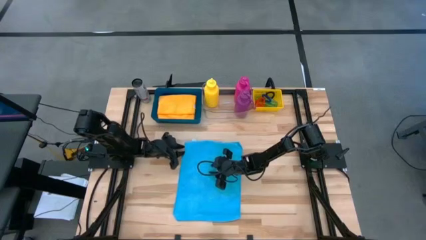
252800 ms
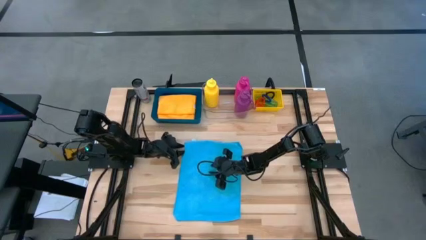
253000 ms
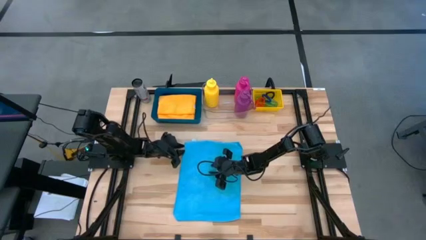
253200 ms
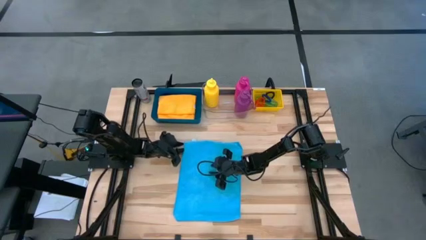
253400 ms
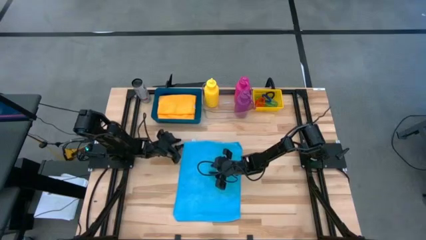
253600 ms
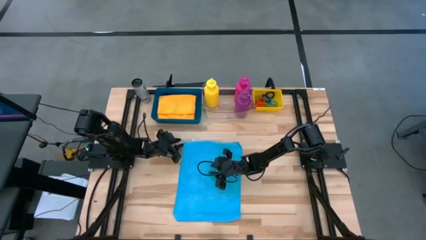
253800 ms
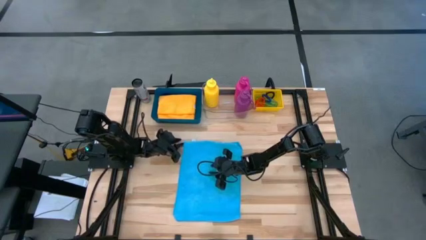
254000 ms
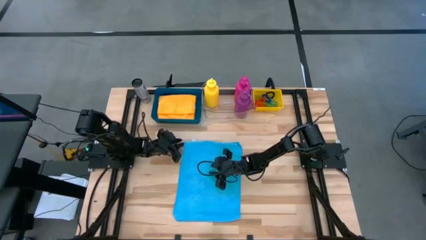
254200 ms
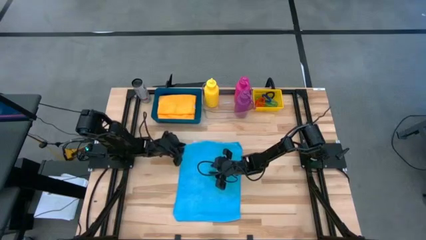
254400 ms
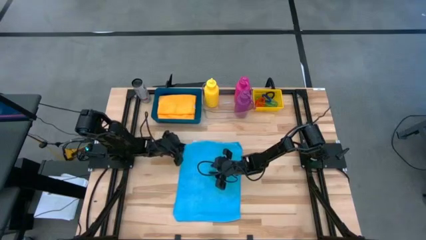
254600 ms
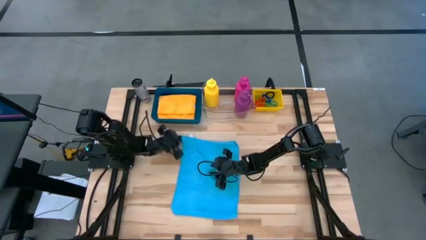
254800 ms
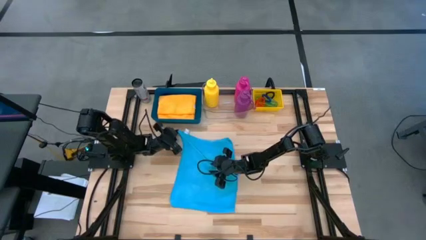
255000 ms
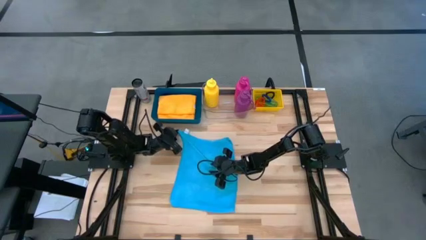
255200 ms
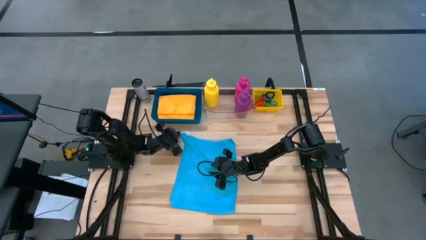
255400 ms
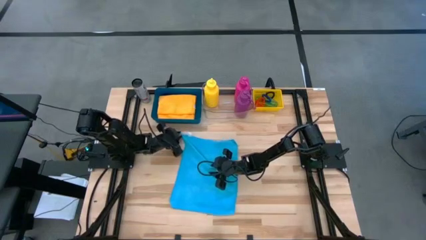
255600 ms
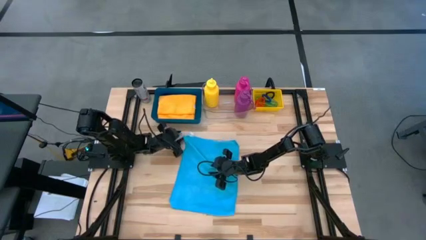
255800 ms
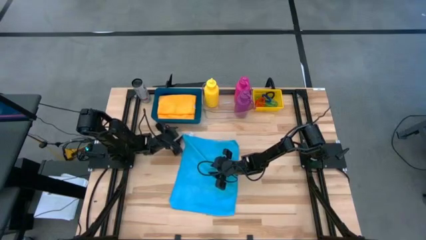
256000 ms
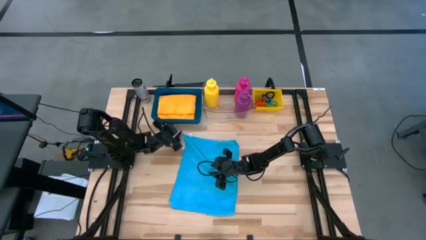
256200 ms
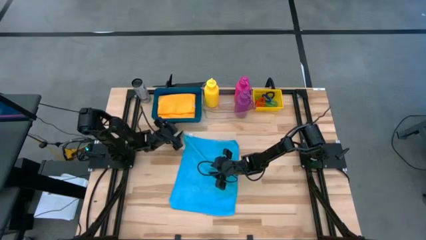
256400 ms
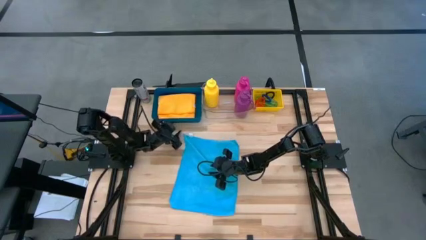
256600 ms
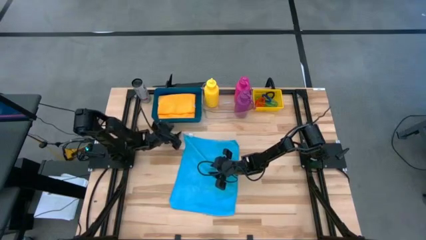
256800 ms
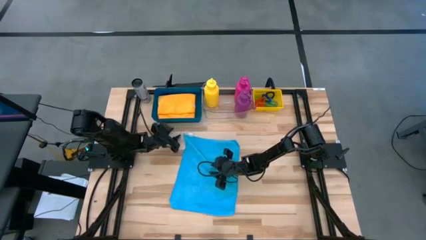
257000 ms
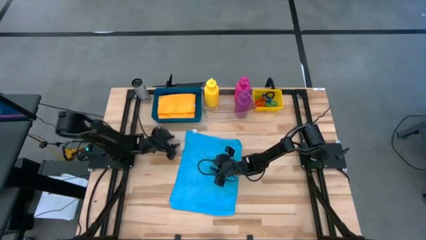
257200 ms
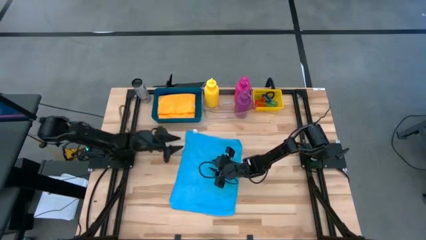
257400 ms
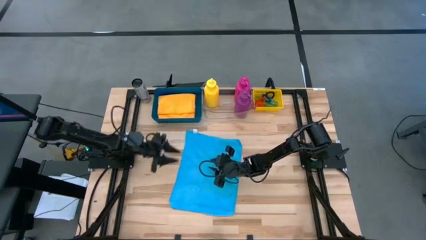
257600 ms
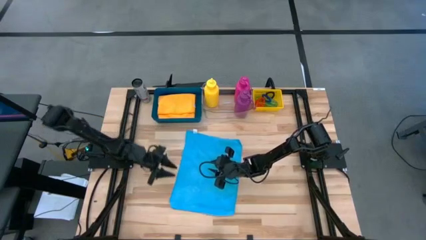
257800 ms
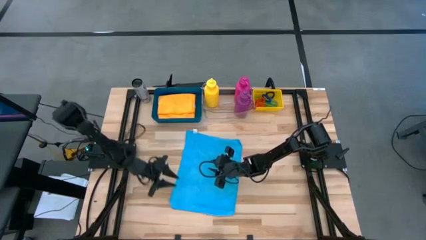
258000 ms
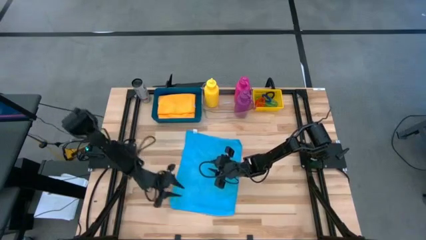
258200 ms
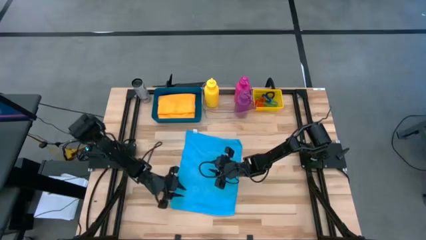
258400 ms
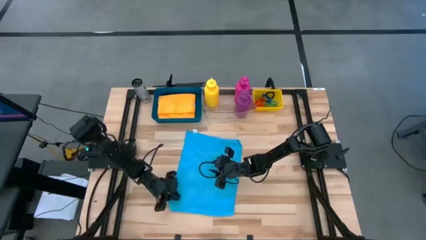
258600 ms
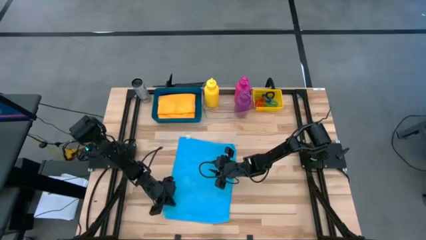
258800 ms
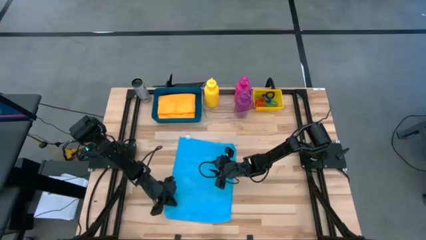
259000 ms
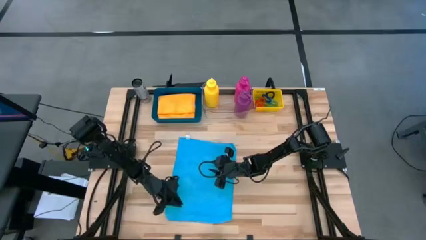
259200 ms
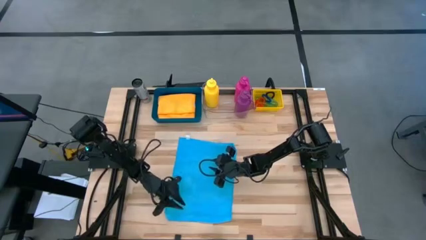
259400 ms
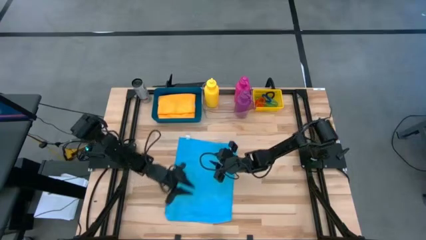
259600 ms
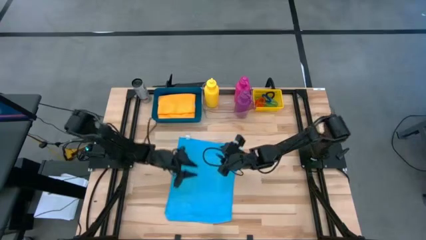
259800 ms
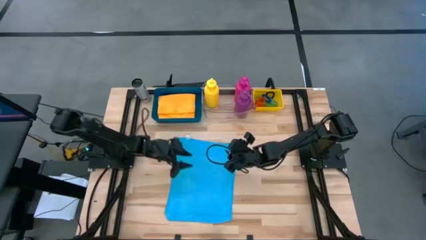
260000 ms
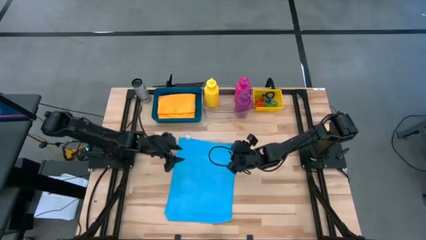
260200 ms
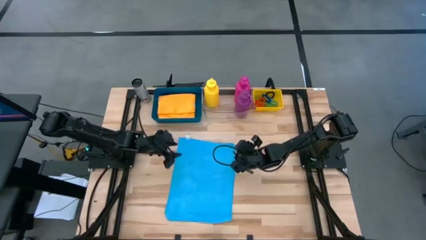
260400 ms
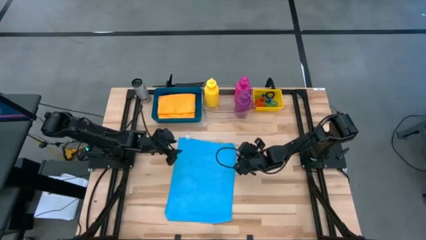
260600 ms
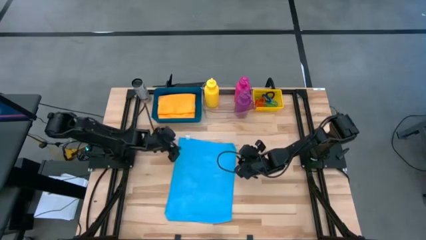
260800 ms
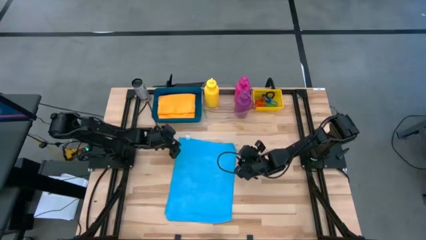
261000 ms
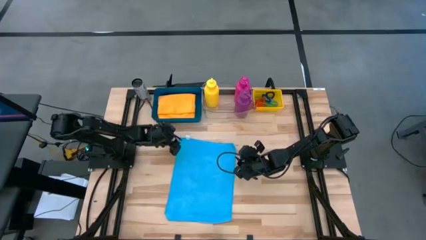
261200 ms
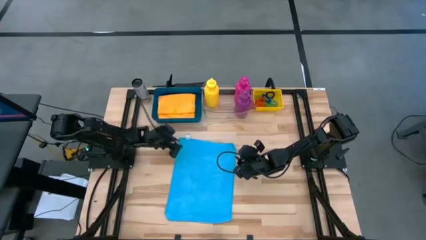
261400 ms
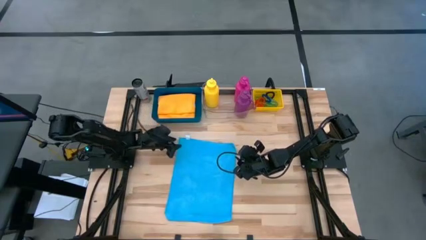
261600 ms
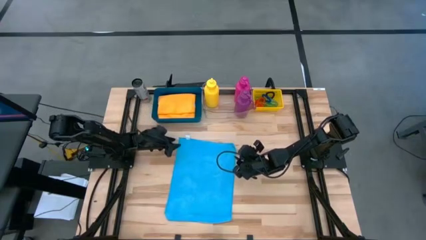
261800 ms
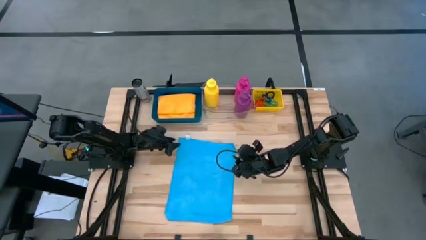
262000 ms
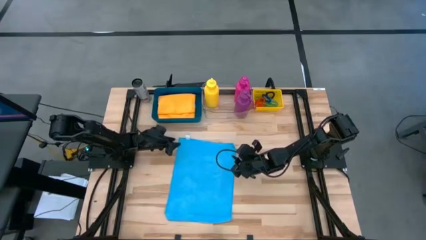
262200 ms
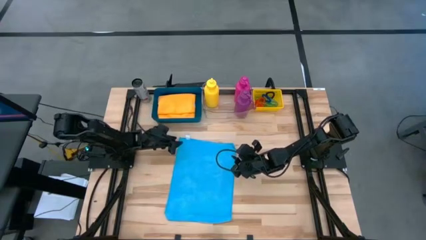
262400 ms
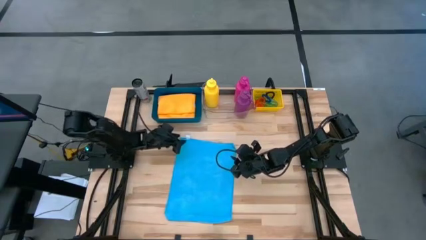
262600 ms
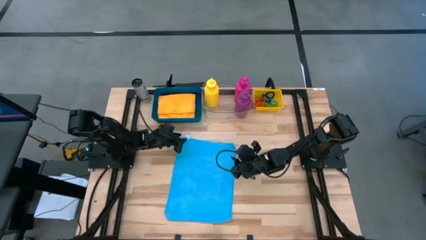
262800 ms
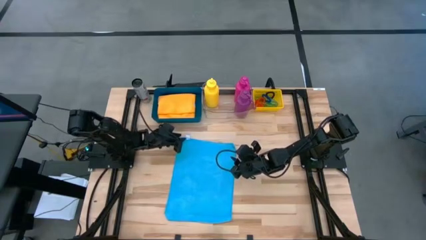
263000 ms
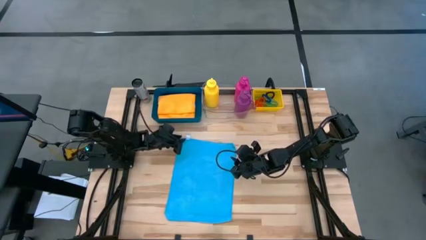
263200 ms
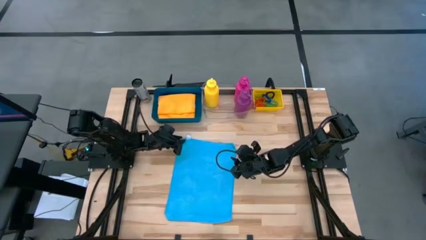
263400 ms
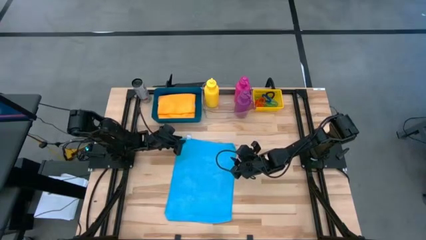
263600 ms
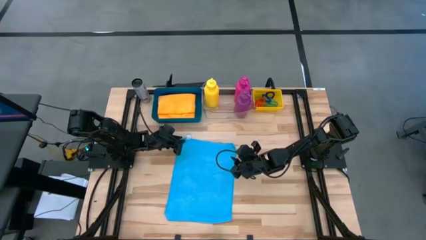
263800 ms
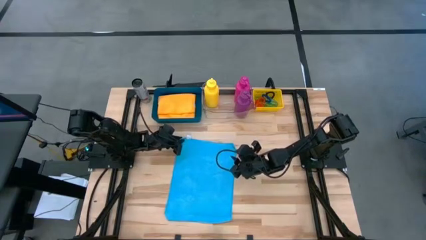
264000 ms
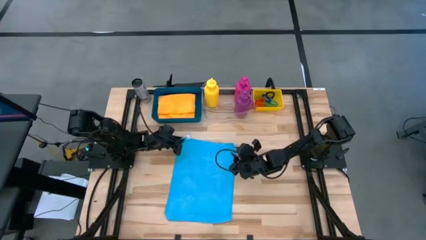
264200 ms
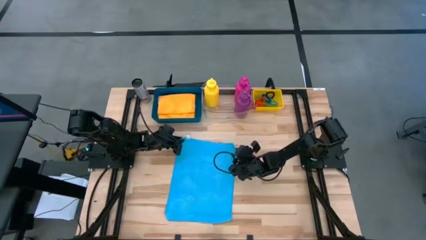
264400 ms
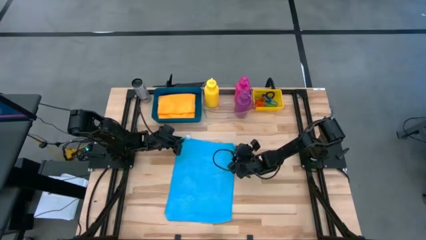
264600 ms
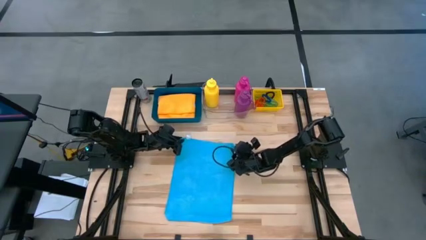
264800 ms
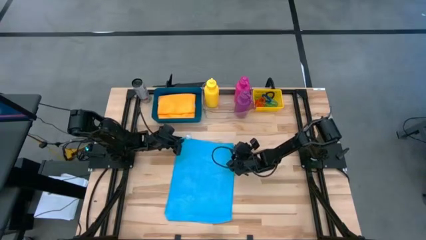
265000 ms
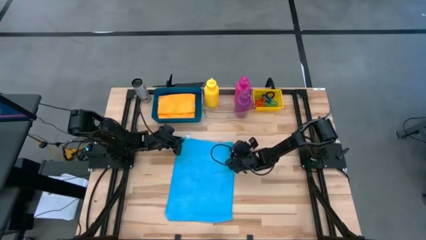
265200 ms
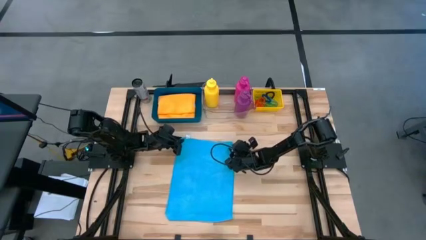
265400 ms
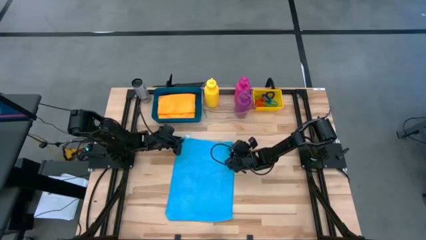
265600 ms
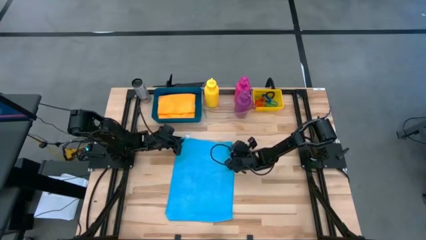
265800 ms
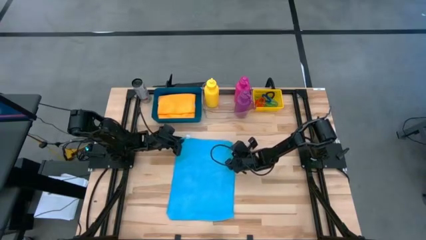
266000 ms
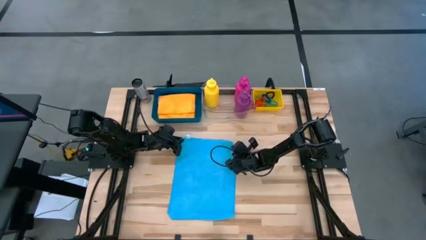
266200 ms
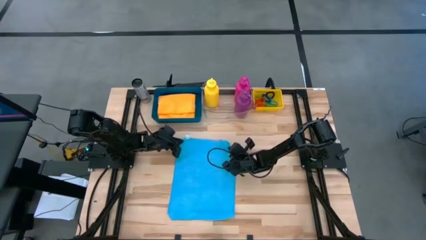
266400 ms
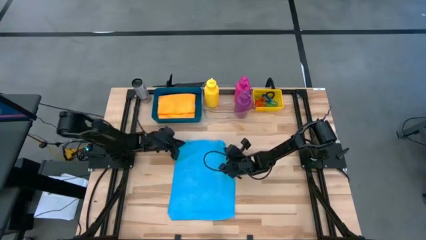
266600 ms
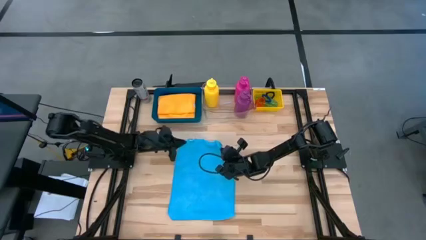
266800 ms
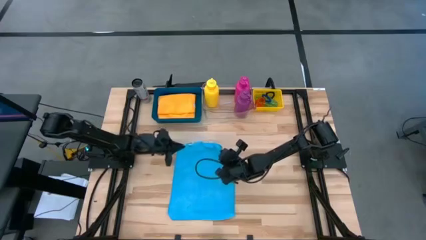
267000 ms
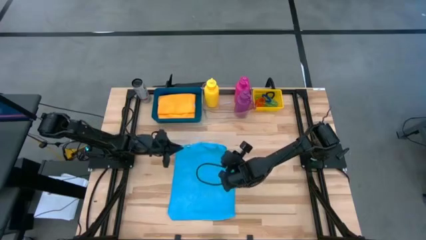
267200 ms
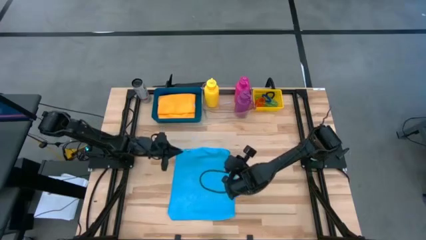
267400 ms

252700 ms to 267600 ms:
Task: Pick & Place Sports Items
Fold the blue towel
